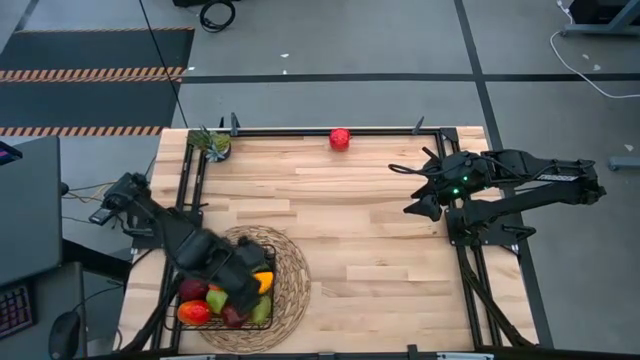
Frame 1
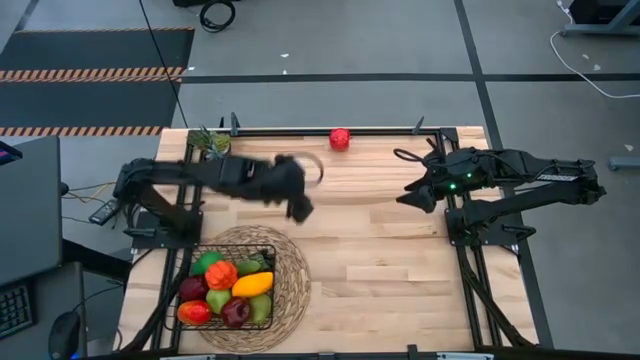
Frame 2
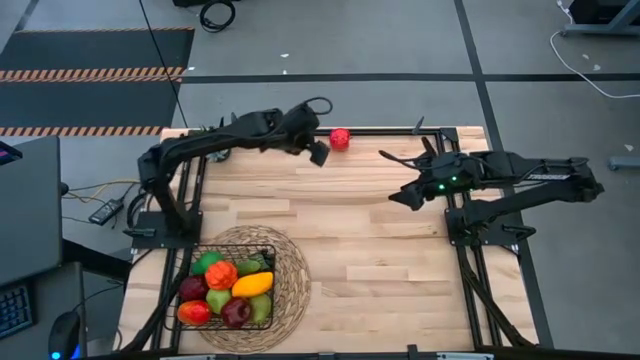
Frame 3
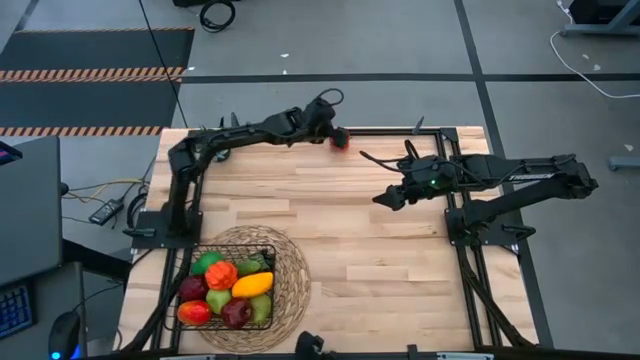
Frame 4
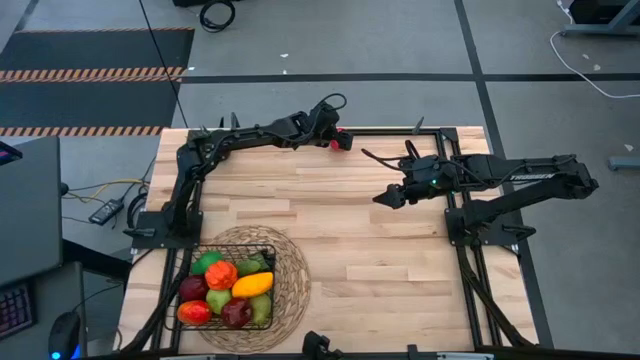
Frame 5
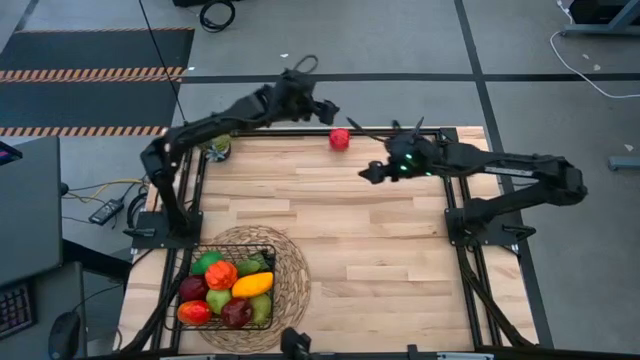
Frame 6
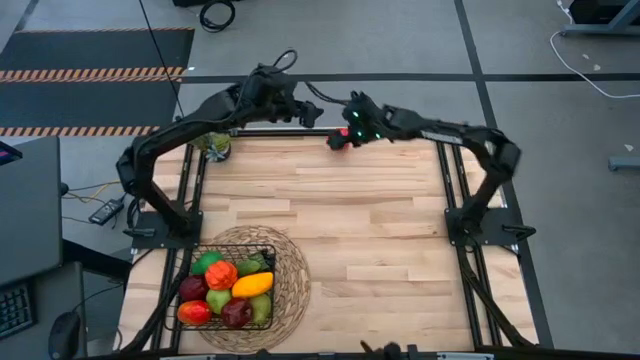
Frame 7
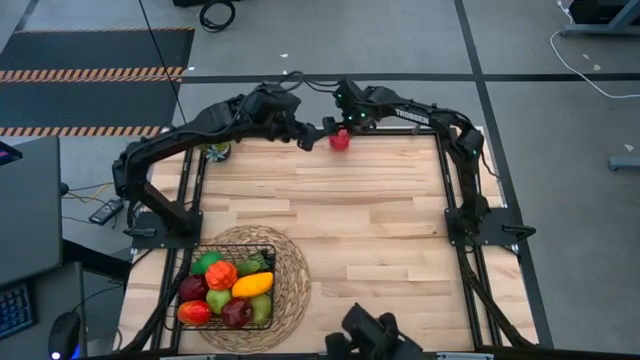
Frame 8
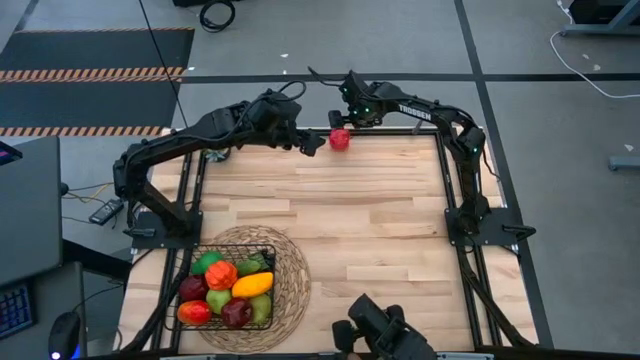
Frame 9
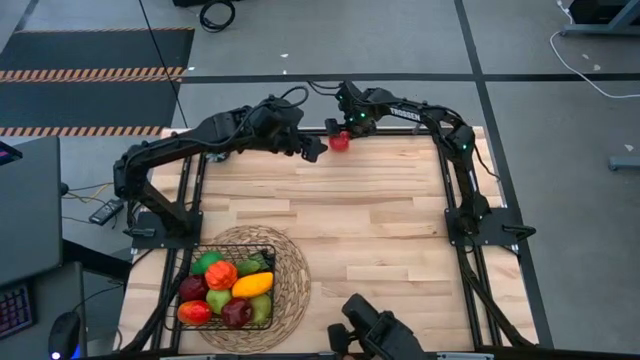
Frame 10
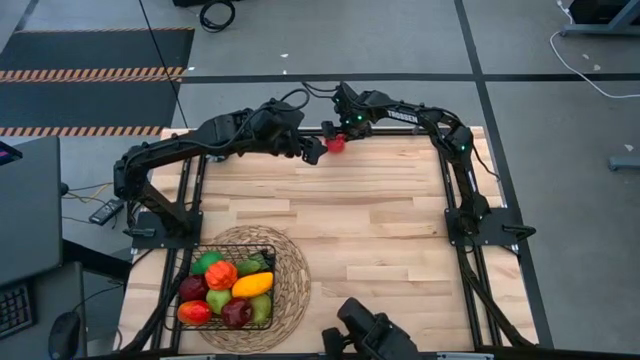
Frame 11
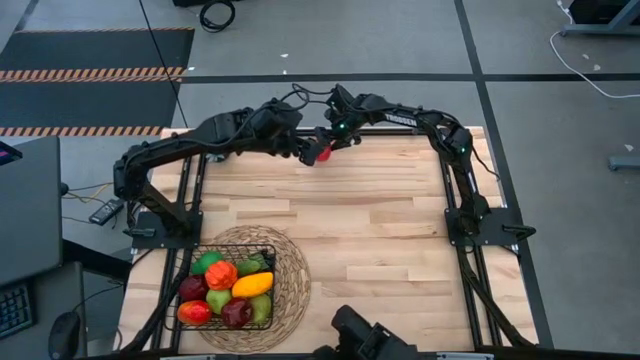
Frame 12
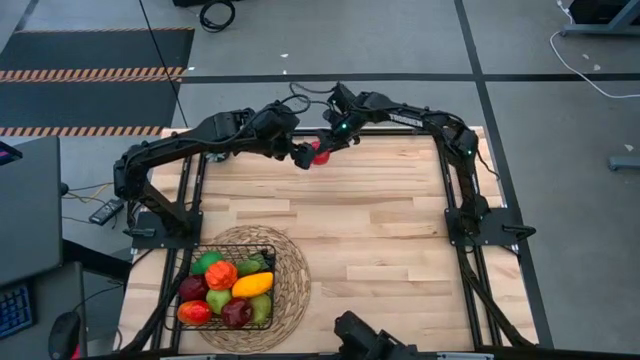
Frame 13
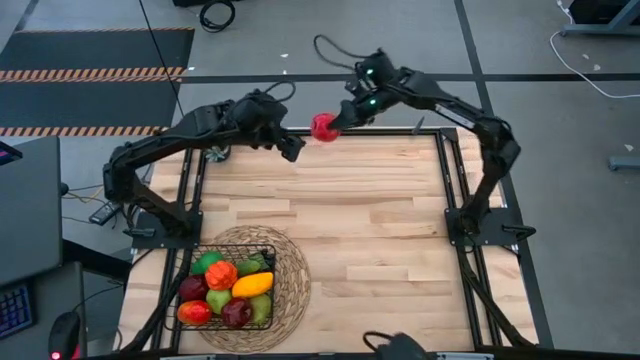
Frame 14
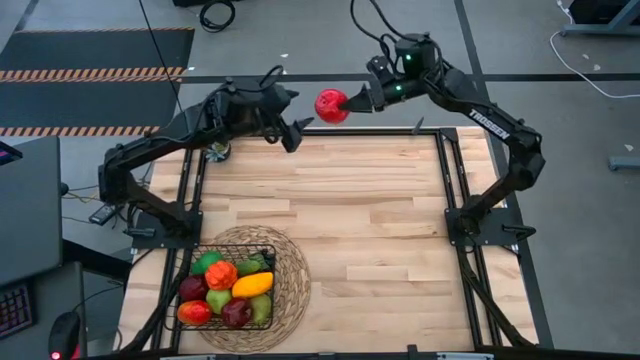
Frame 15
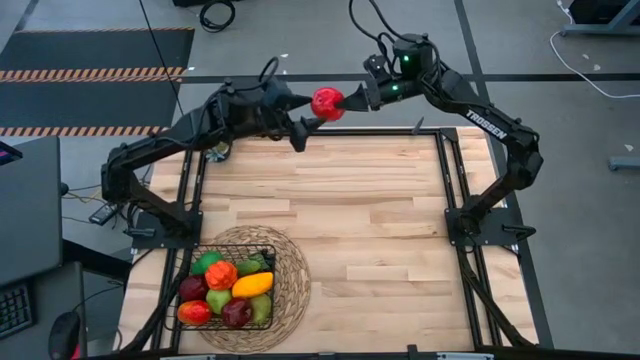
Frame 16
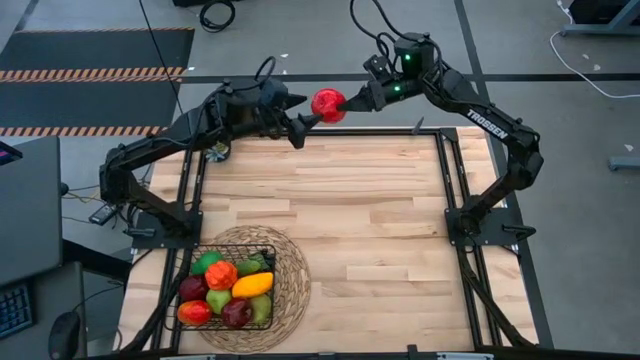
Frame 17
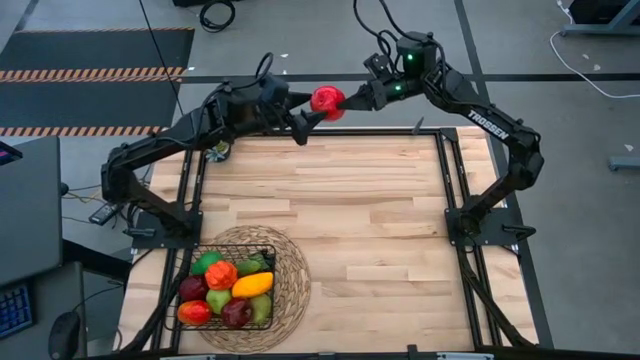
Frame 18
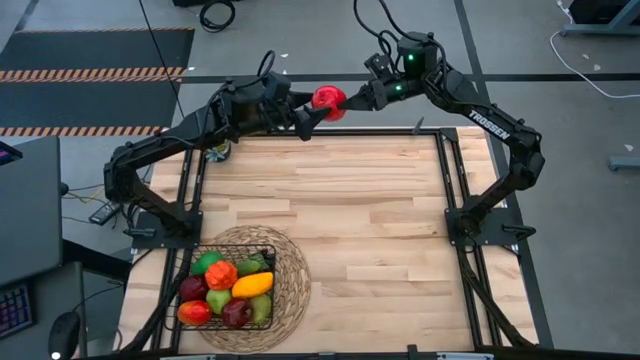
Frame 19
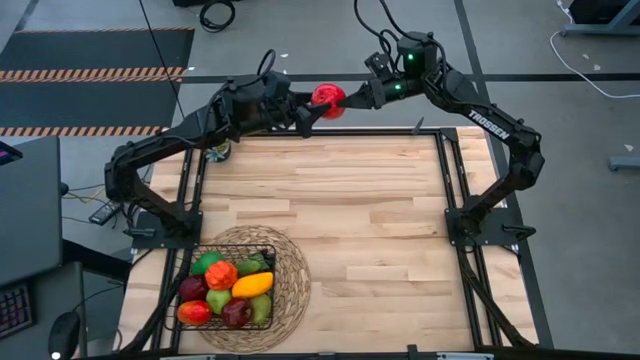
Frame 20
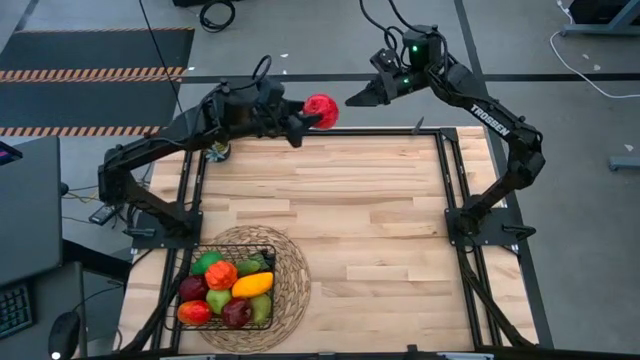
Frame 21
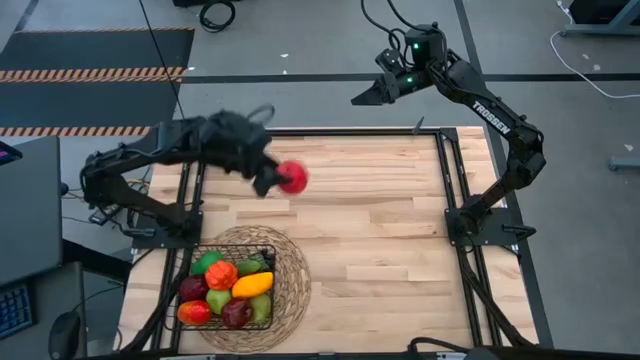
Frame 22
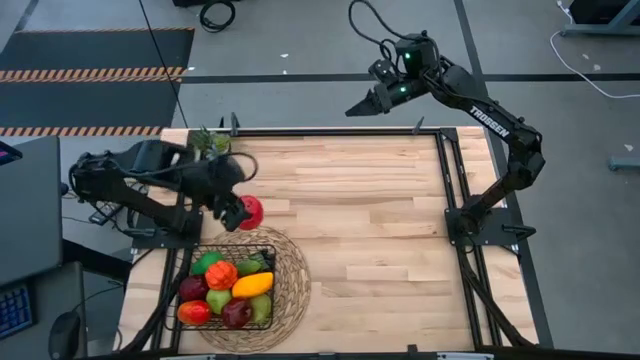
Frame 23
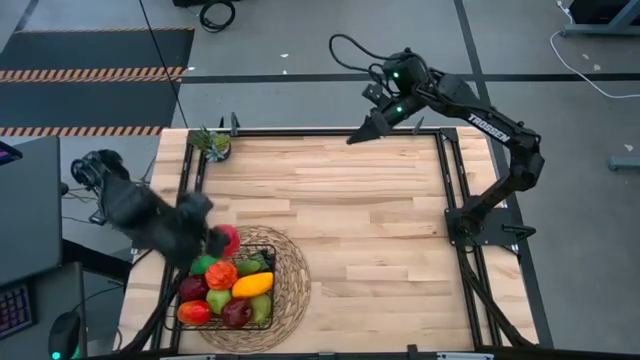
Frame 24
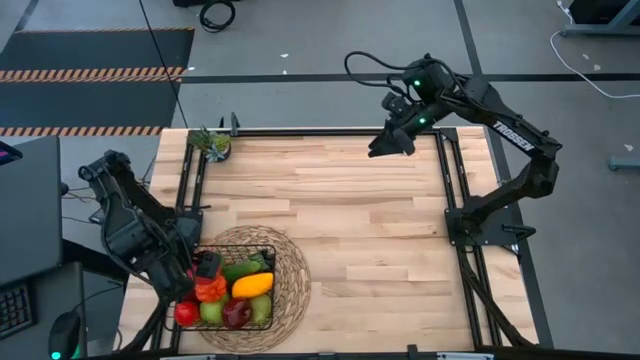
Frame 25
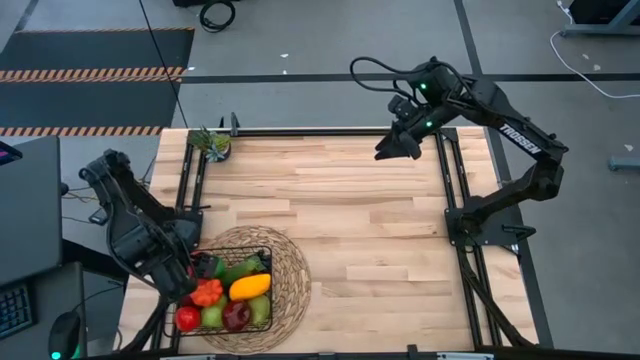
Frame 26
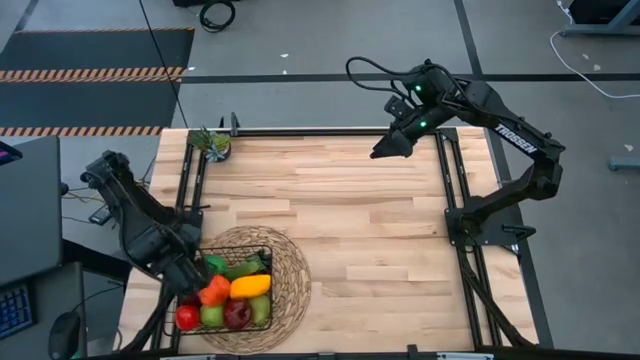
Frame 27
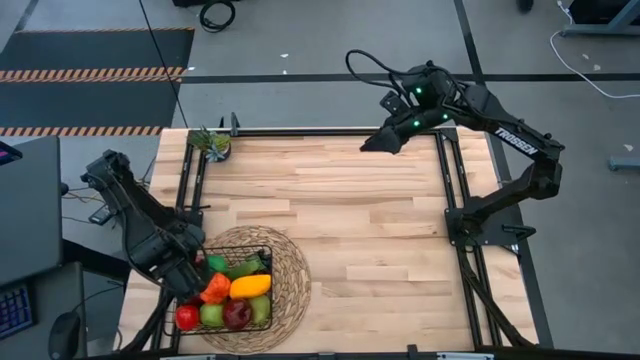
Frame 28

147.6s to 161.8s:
Task: Build produce basket
Put the red apple into the black wire basket

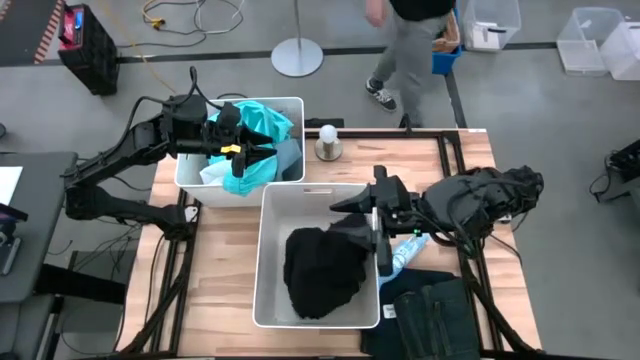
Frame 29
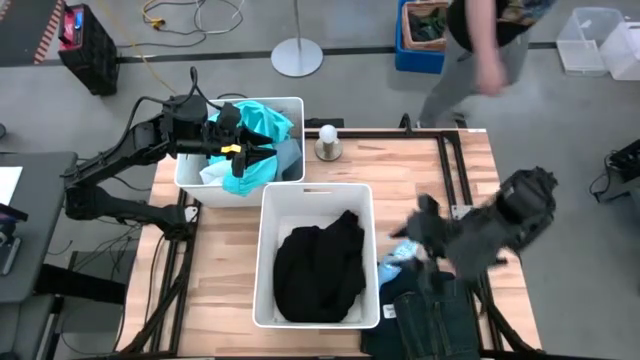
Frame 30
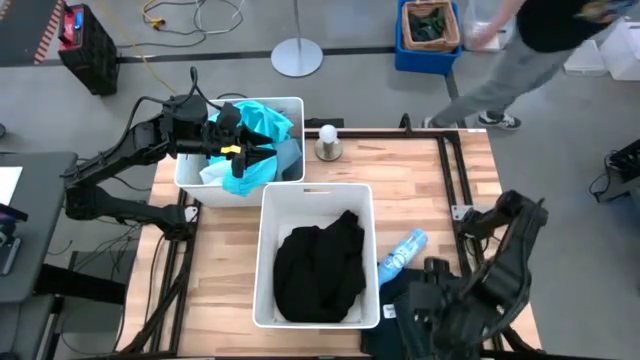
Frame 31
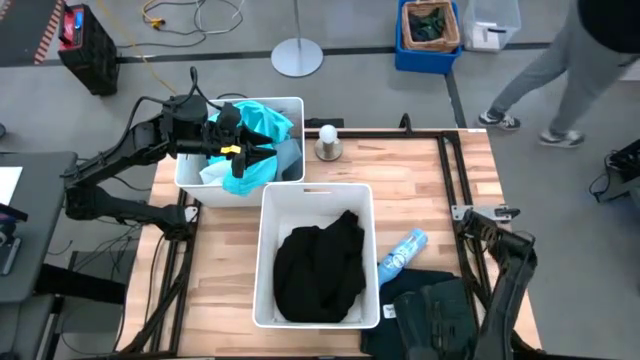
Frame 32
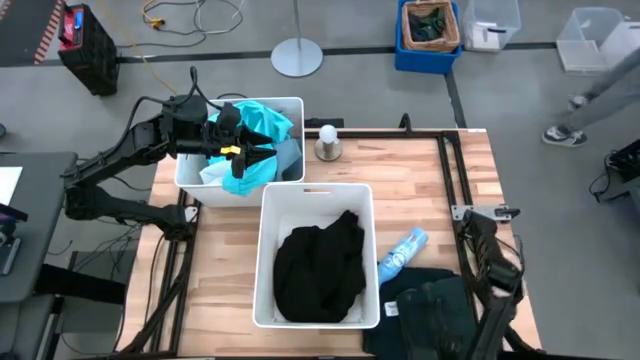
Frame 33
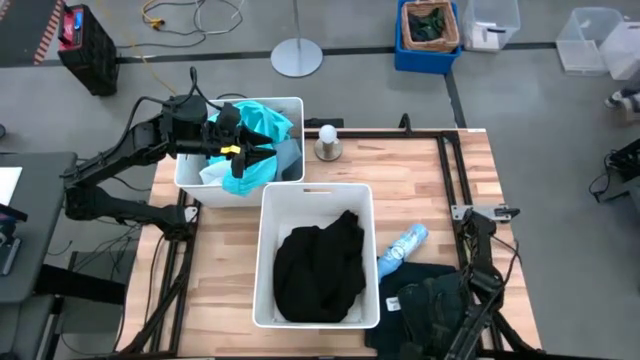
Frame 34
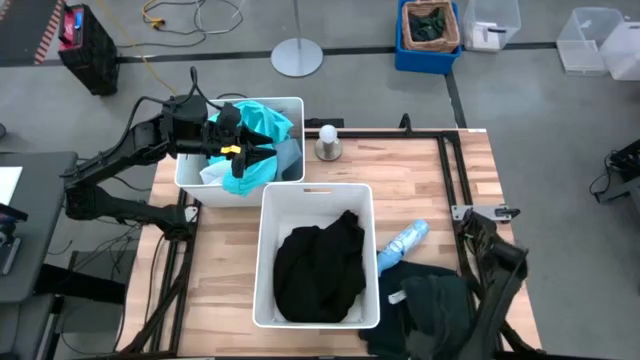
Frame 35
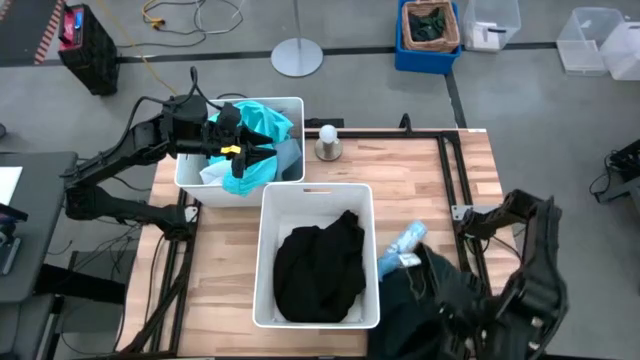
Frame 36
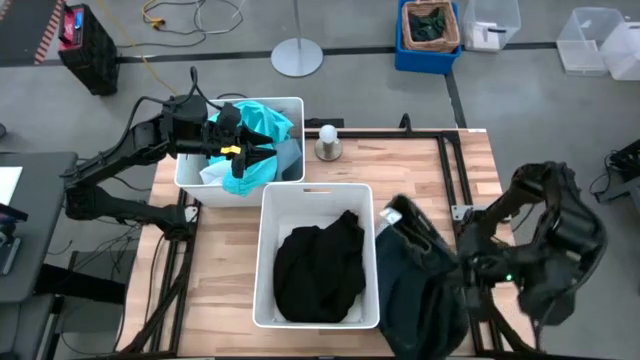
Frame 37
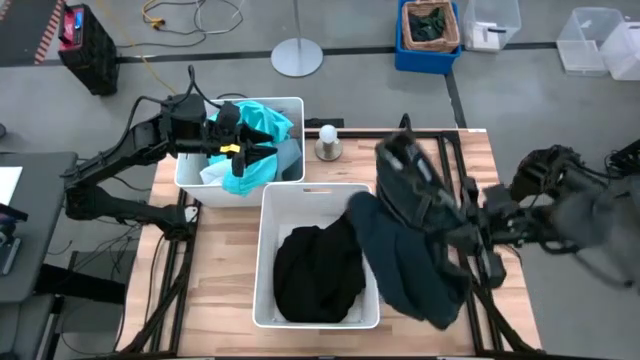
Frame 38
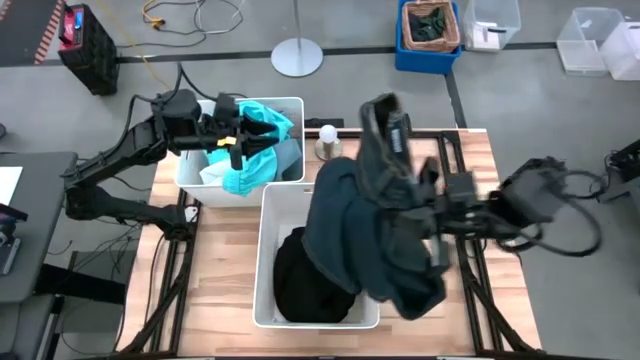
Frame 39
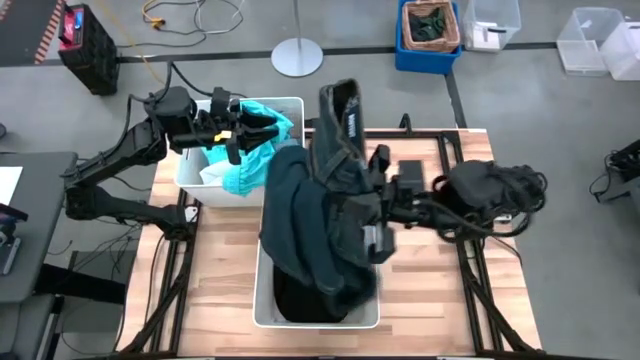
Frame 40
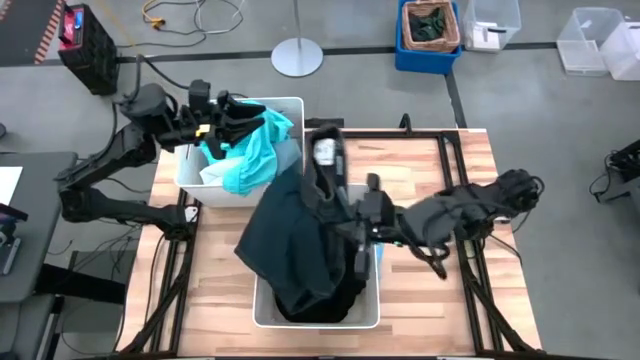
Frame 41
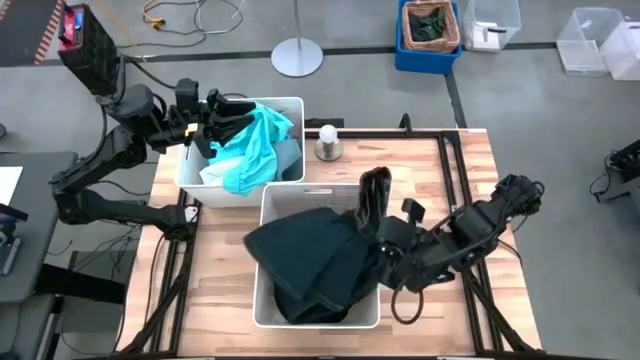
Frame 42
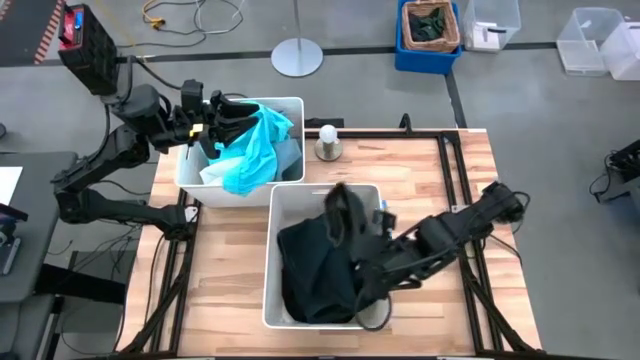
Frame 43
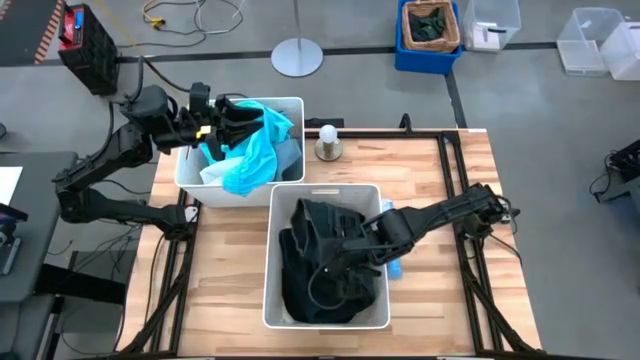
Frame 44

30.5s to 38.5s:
Task: Sort clothes
Put the black pants into the bottom white bin
